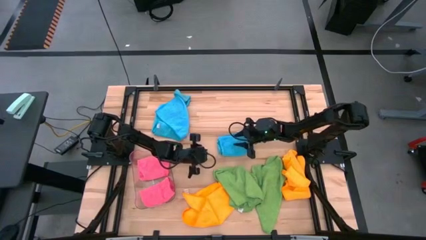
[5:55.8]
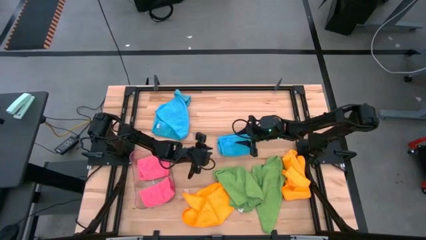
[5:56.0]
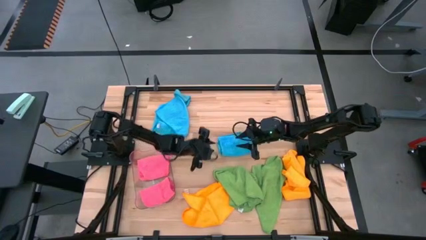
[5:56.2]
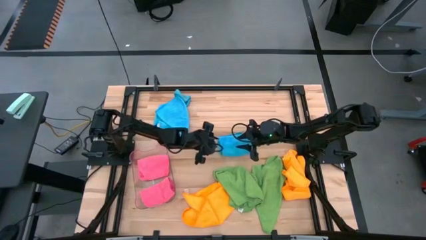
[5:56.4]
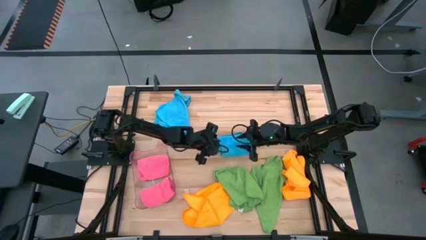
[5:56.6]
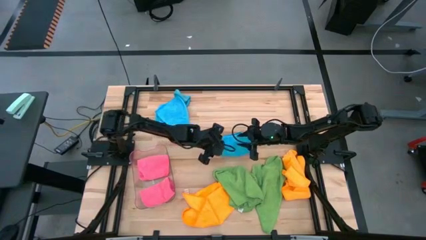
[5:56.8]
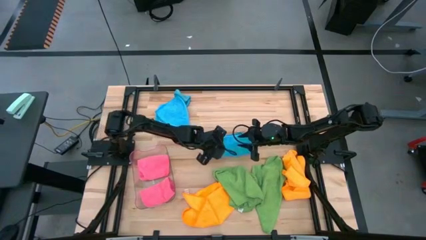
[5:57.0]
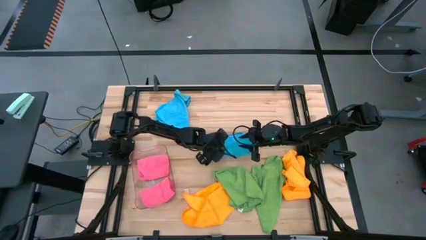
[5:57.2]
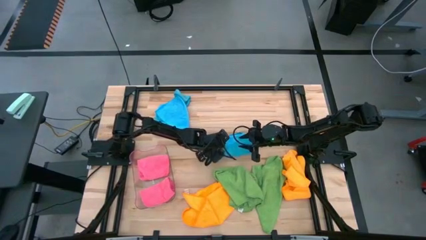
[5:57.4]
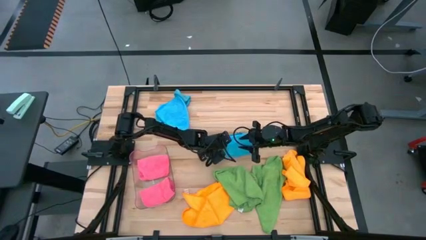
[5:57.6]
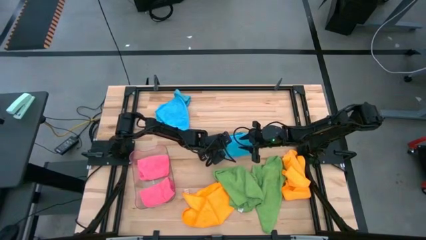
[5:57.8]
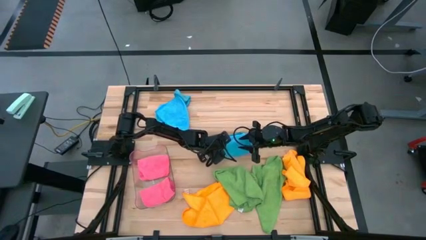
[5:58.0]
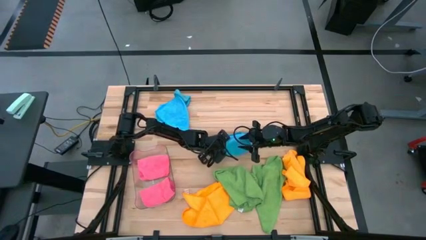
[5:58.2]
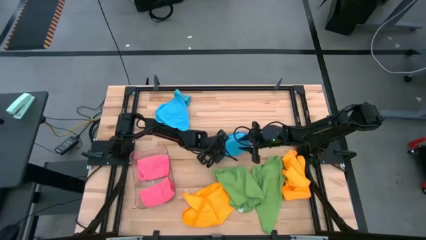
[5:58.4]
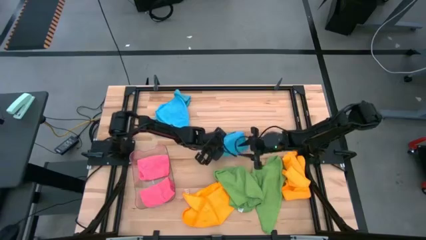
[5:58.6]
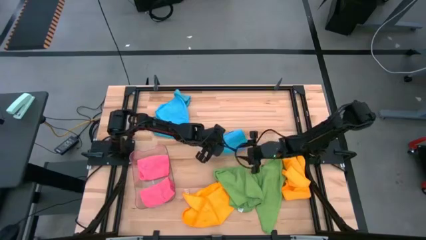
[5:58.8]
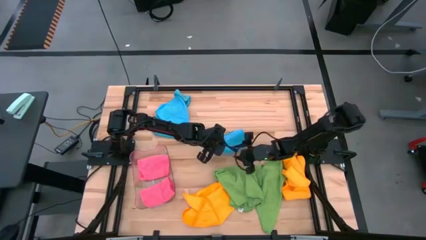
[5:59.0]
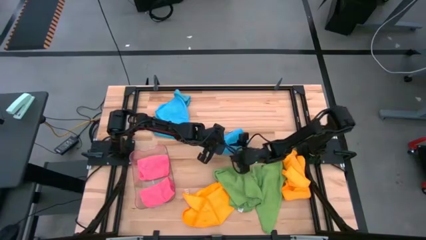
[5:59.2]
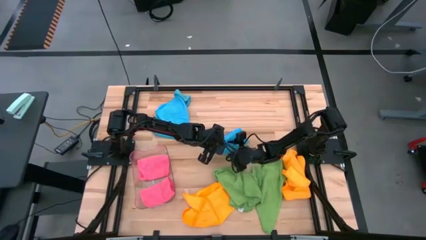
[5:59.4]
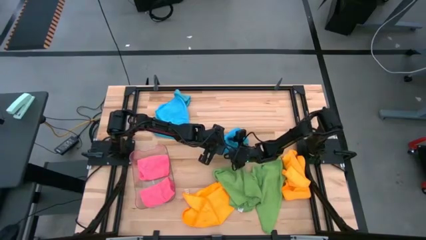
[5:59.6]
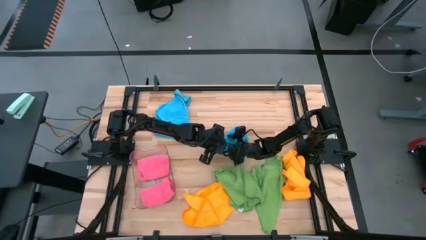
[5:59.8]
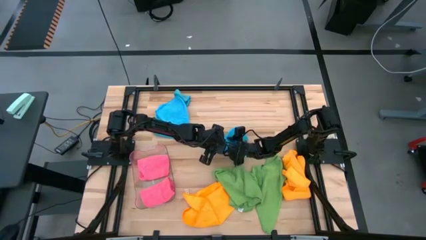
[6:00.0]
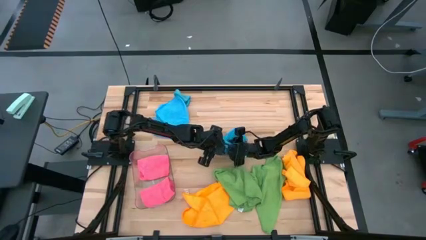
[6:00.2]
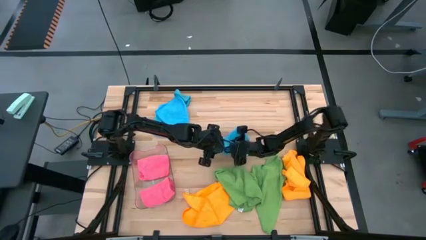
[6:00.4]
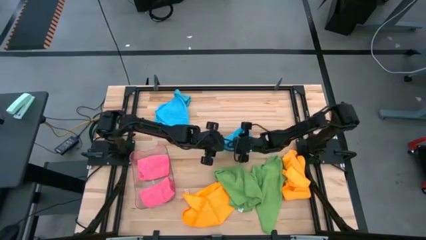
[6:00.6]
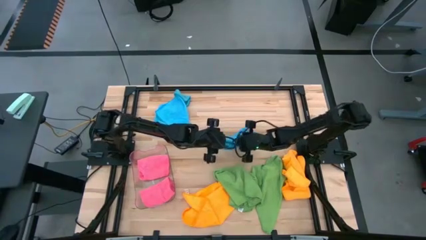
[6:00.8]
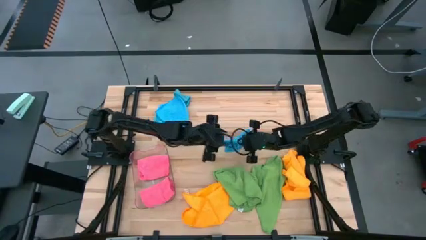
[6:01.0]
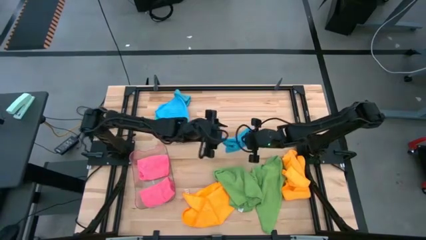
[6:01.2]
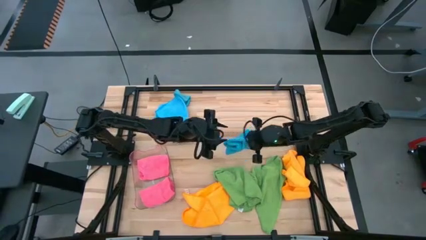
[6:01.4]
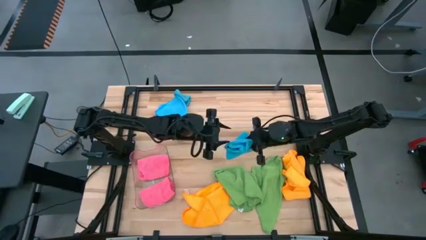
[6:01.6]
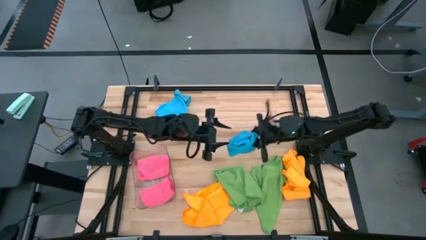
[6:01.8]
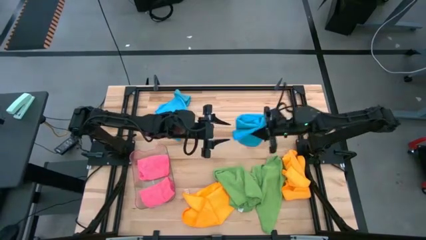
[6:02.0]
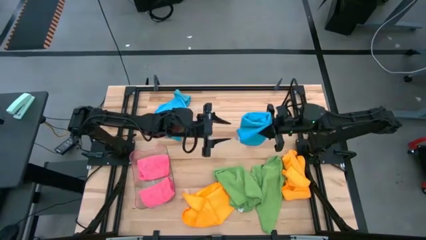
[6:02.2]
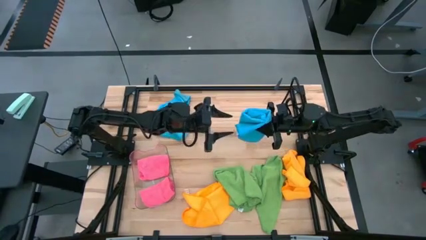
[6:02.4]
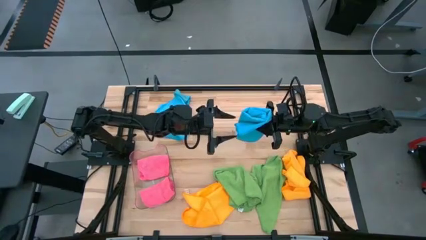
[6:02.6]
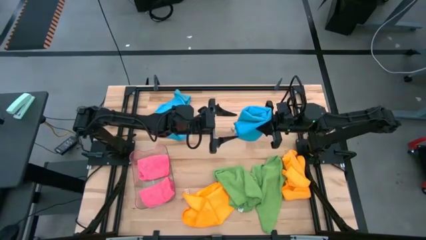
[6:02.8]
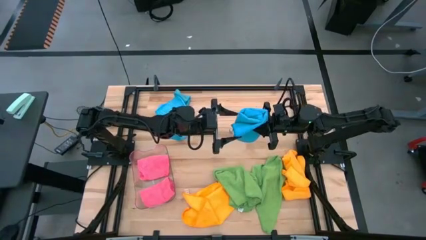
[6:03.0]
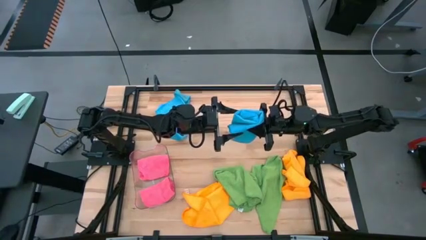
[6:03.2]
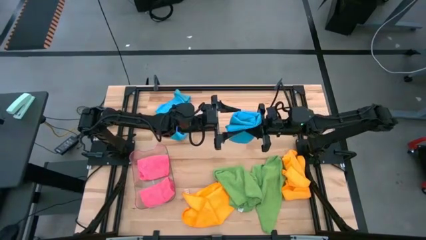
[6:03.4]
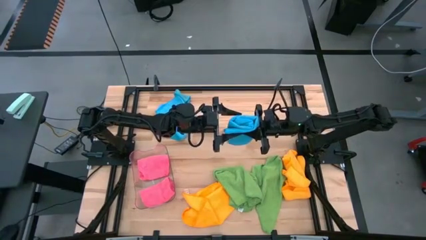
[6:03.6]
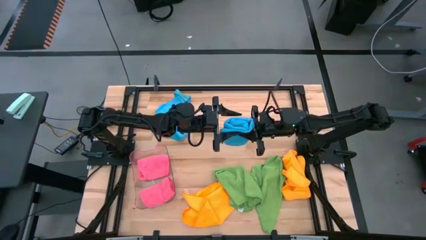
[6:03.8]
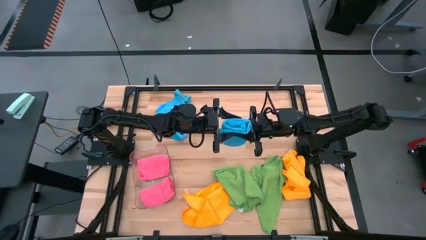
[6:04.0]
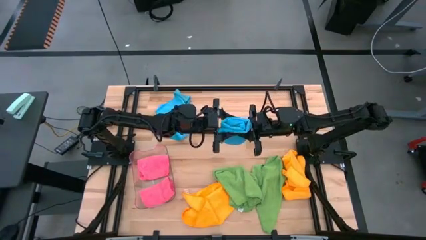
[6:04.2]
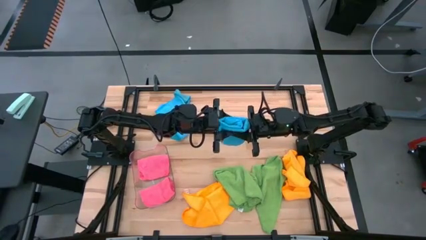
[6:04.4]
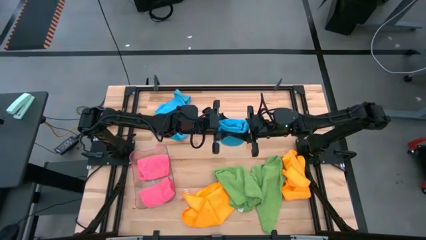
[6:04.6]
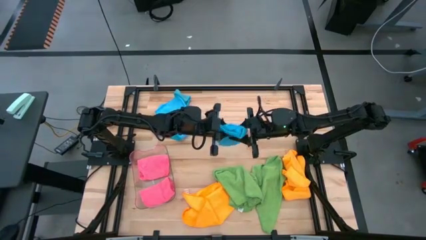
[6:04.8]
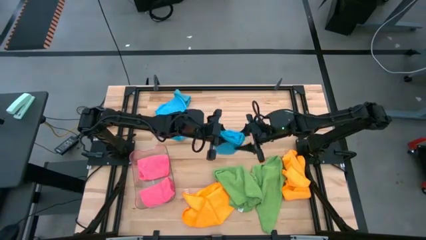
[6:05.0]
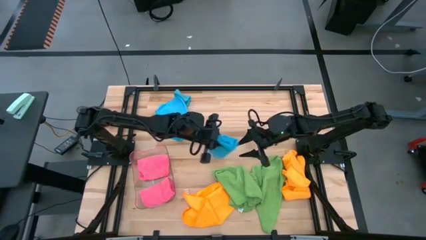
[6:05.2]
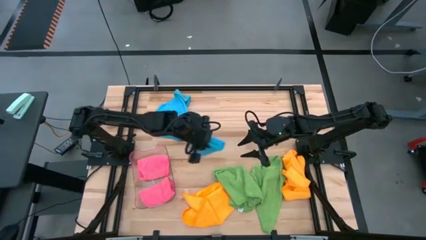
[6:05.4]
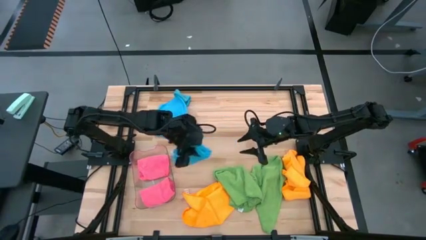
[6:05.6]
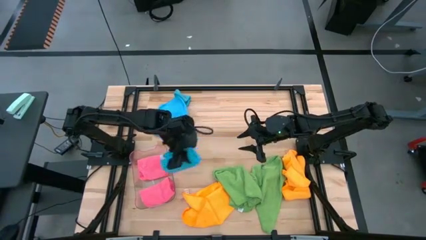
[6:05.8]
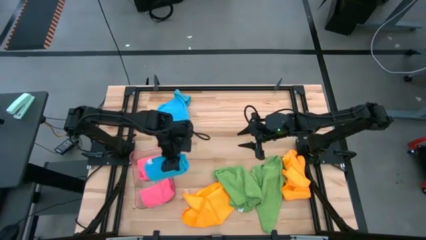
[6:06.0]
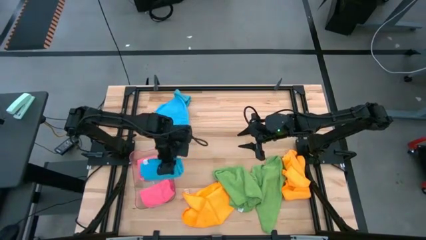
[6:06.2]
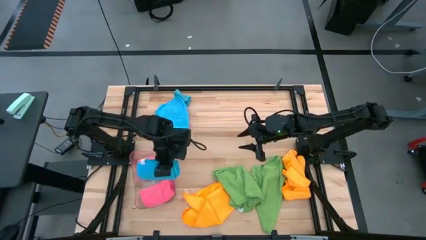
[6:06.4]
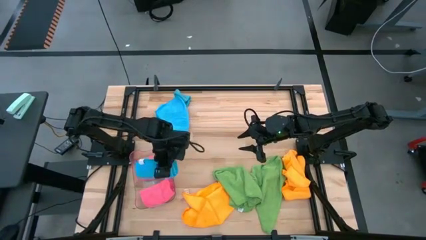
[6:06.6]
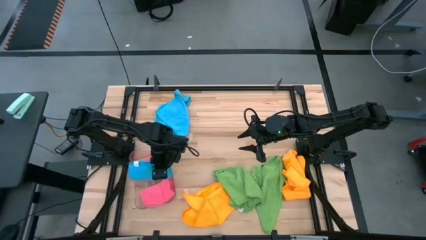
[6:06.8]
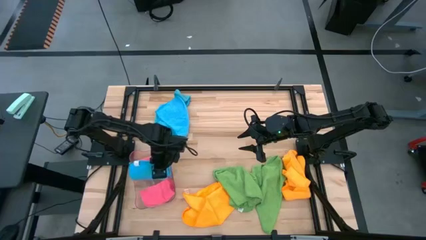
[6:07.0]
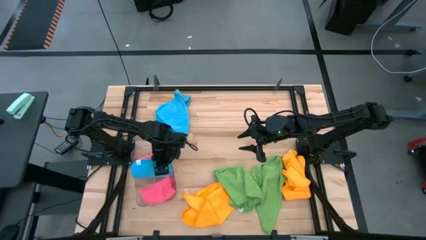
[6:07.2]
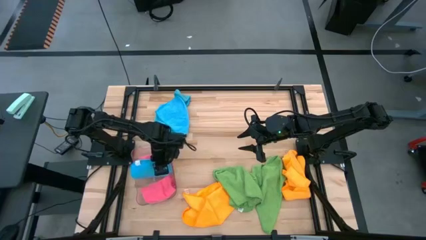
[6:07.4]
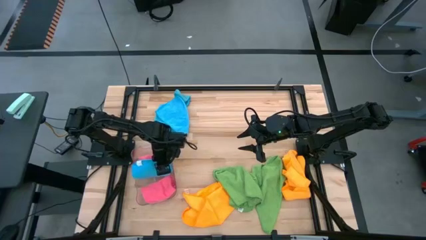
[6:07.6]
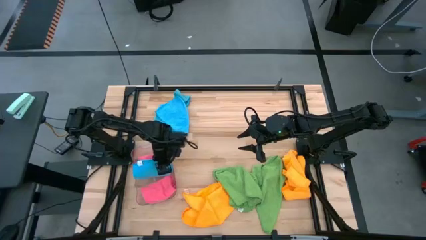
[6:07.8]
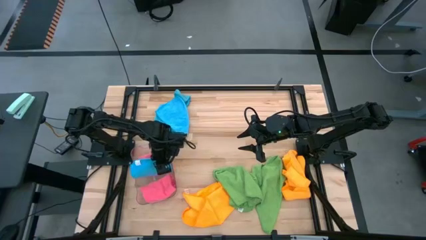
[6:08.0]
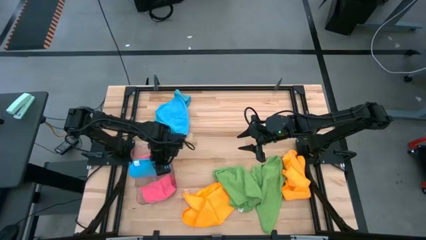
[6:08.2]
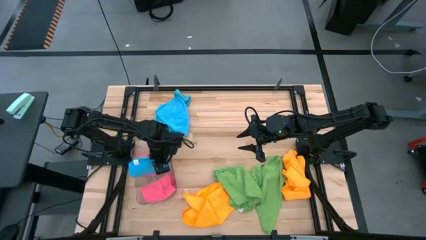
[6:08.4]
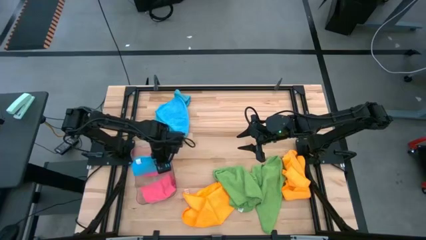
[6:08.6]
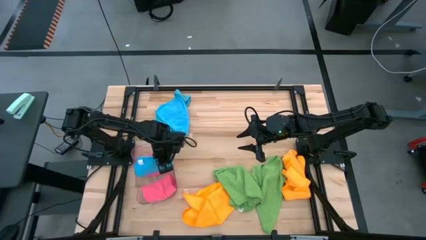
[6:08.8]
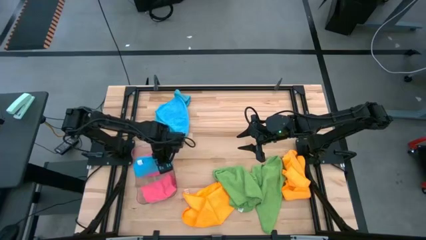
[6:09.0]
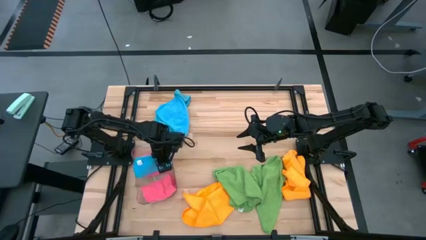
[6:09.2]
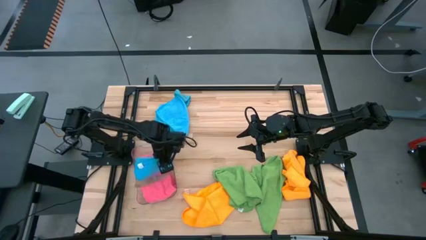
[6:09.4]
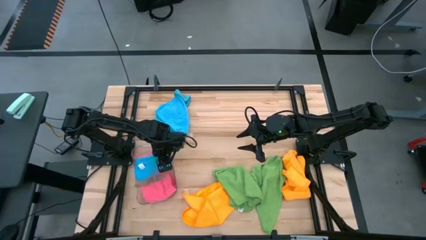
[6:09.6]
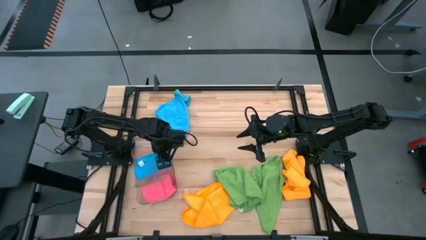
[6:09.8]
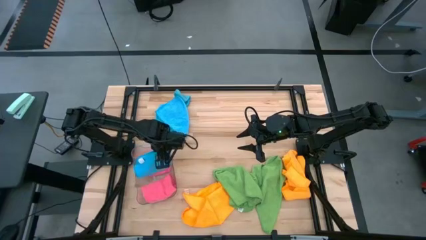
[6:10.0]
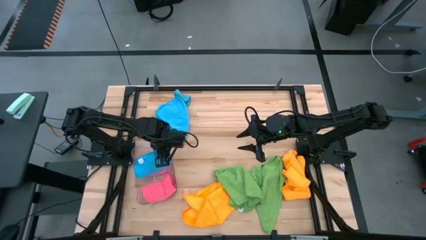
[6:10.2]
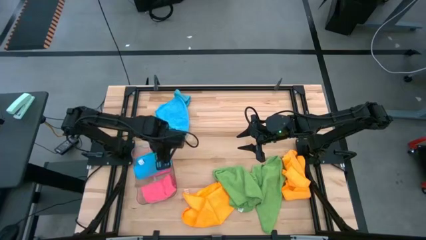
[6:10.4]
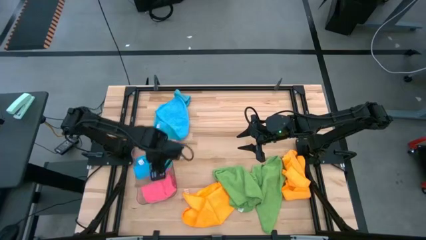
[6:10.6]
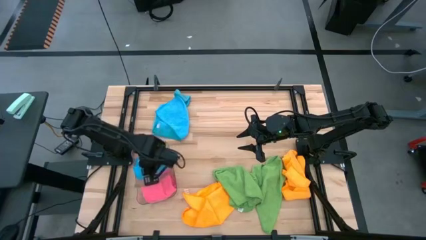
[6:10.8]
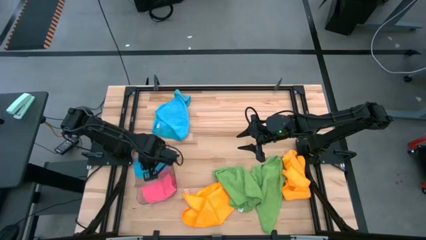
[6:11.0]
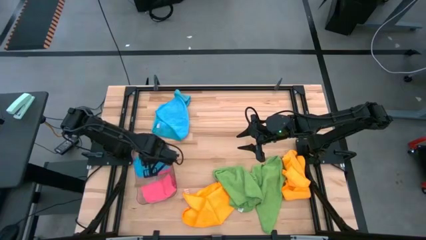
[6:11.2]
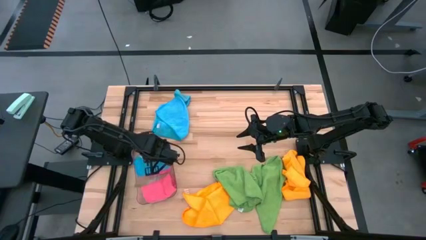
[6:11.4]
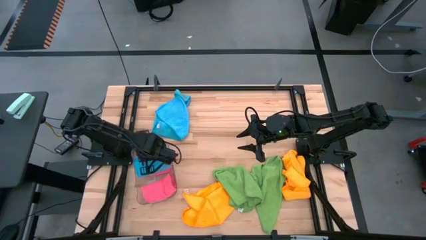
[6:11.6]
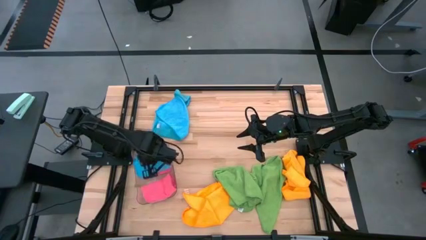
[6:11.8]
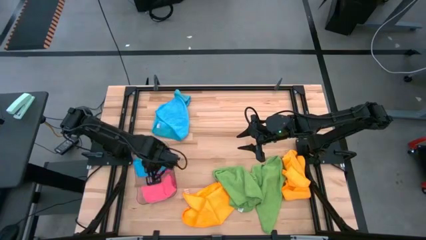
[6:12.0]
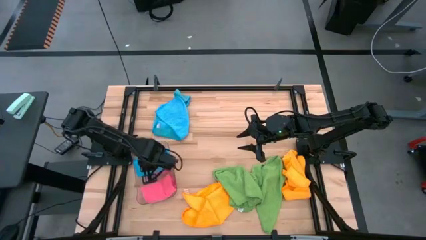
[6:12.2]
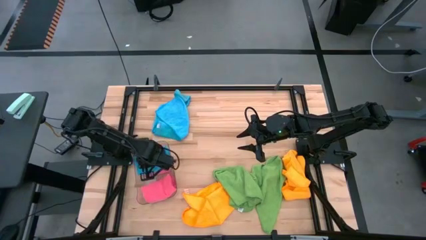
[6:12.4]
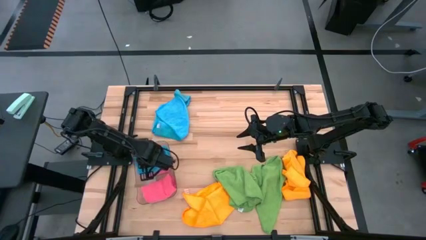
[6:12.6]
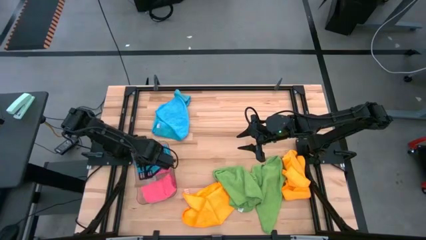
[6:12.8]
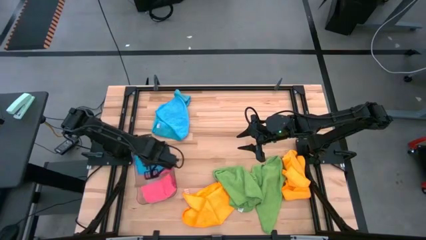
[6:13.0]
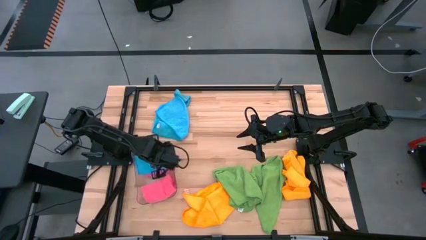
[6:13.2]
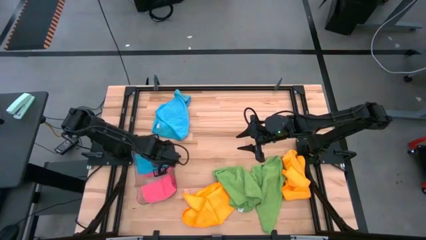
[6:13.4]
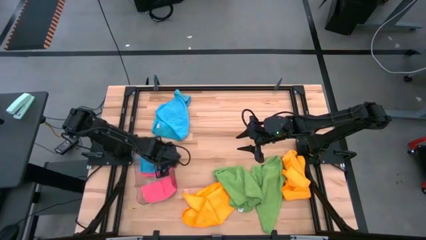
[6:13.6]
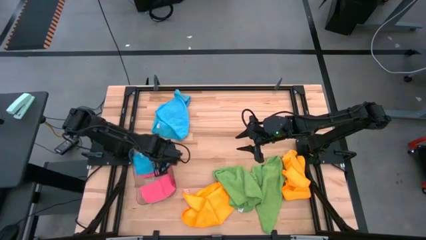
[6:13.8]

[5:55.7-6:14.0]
Task: Fold microfiber towels
Put the bottom blue microfiber cloth into the transparent bin
